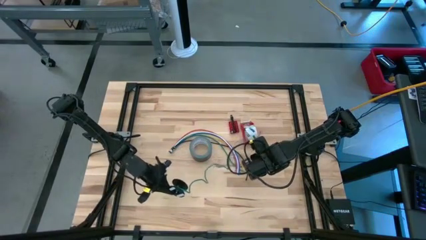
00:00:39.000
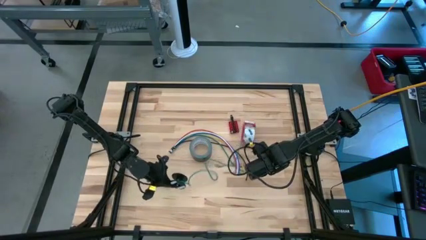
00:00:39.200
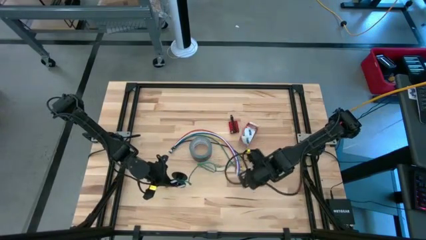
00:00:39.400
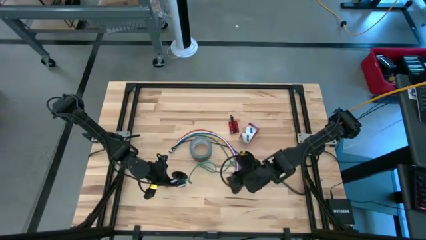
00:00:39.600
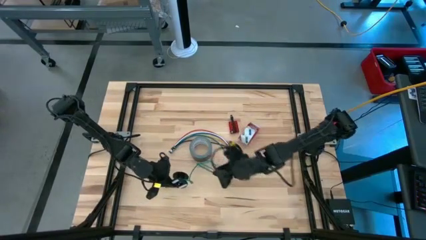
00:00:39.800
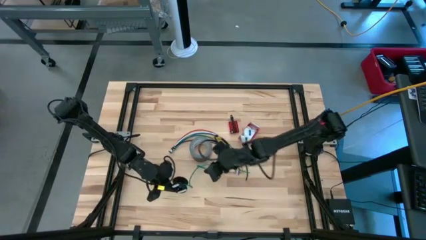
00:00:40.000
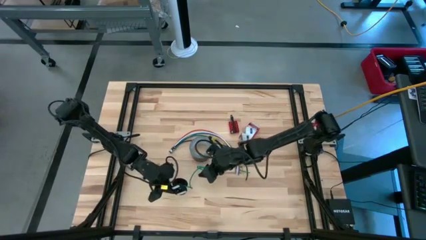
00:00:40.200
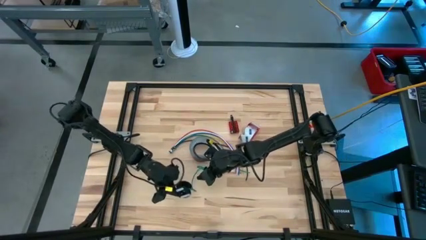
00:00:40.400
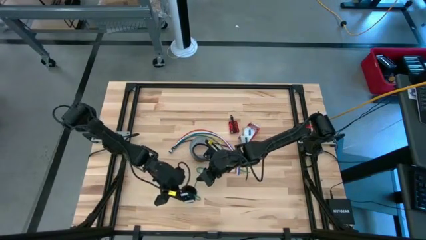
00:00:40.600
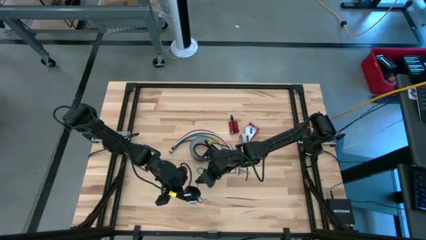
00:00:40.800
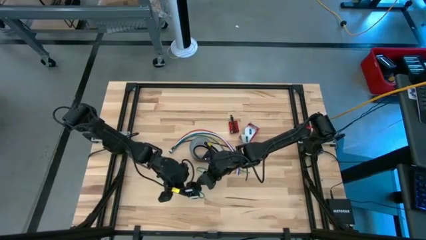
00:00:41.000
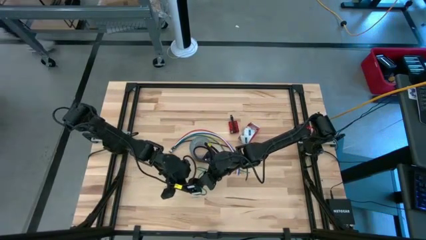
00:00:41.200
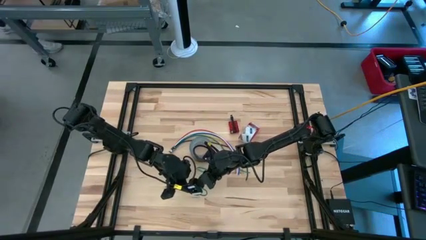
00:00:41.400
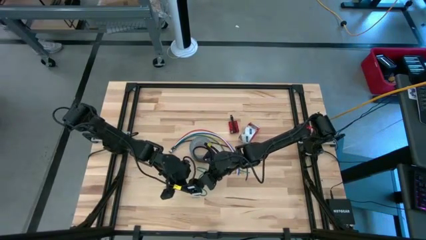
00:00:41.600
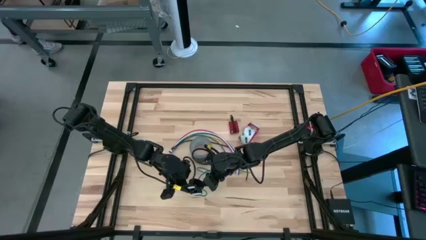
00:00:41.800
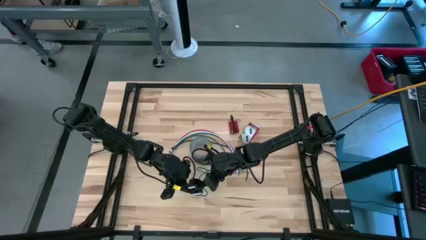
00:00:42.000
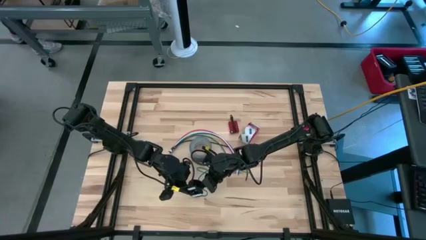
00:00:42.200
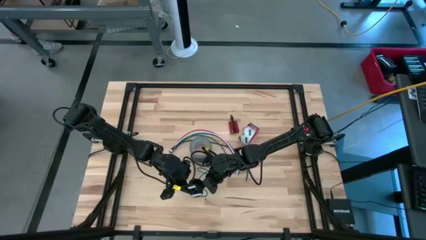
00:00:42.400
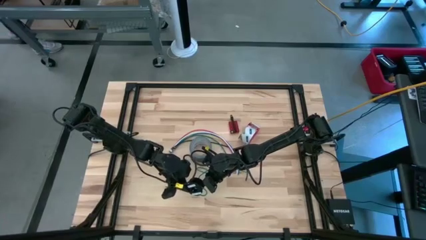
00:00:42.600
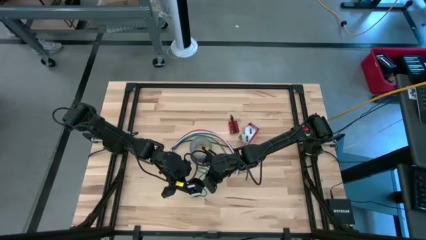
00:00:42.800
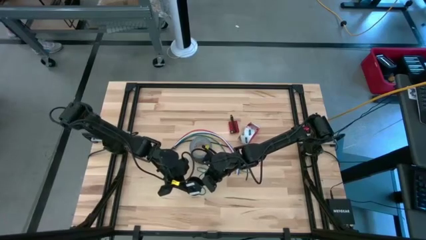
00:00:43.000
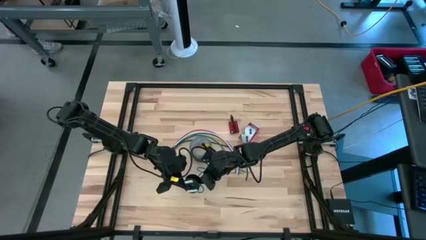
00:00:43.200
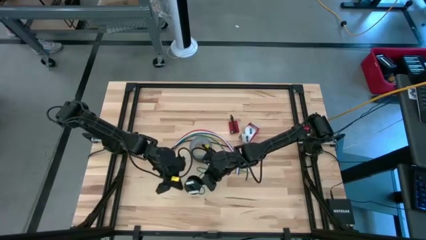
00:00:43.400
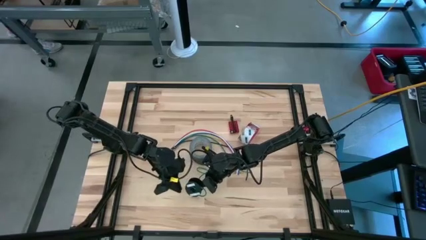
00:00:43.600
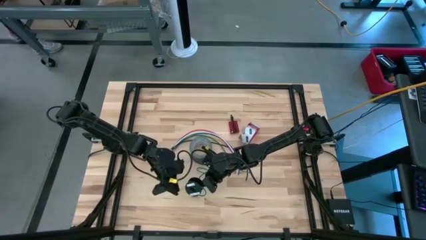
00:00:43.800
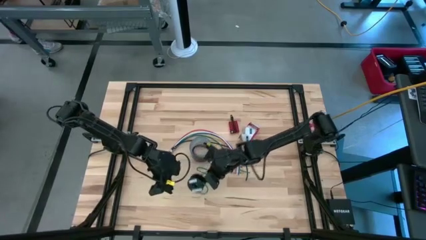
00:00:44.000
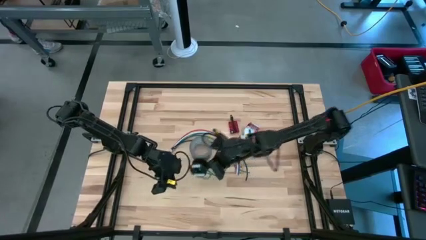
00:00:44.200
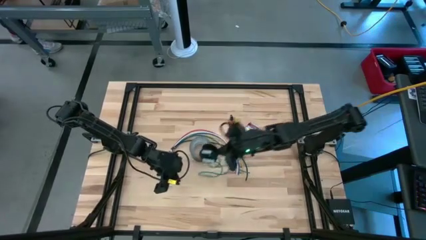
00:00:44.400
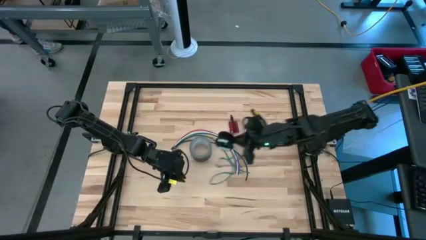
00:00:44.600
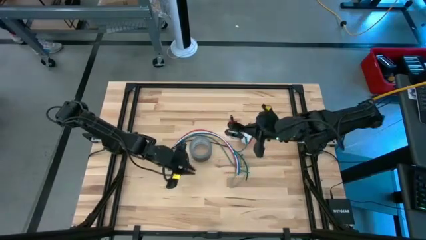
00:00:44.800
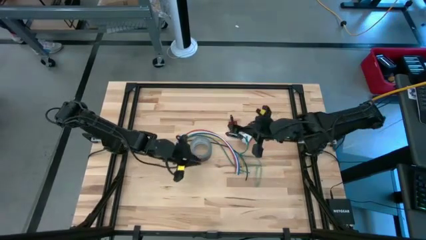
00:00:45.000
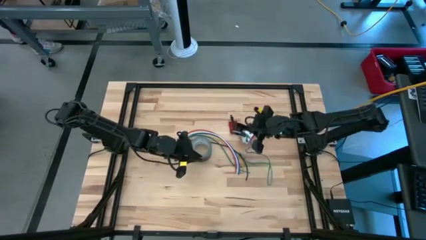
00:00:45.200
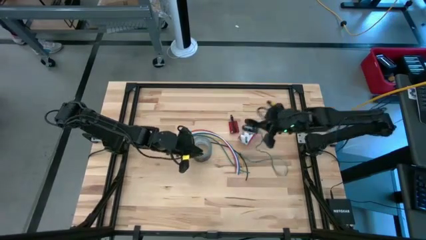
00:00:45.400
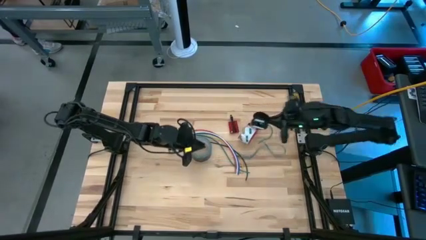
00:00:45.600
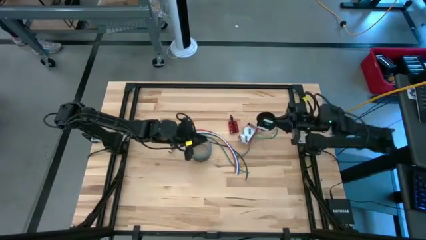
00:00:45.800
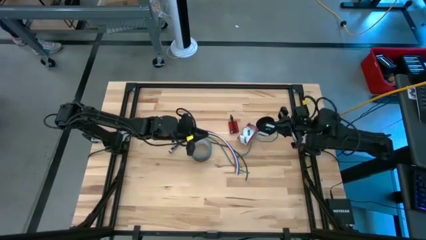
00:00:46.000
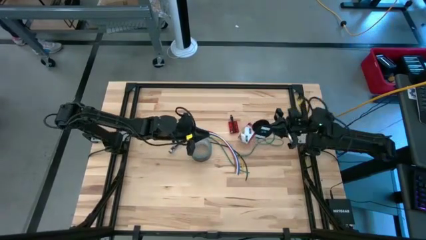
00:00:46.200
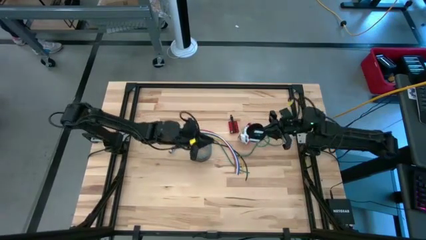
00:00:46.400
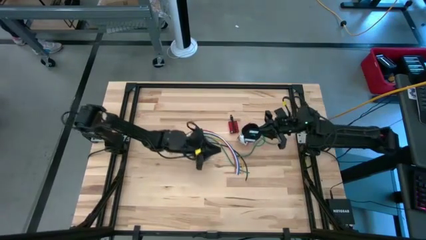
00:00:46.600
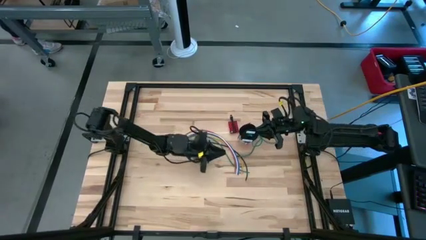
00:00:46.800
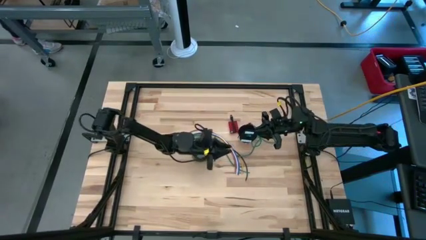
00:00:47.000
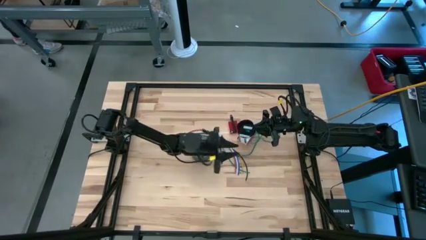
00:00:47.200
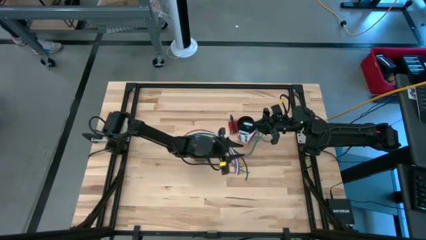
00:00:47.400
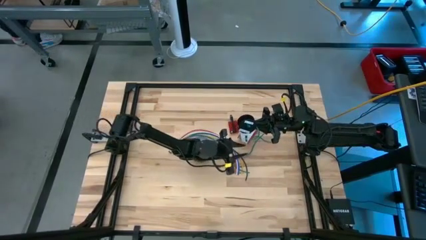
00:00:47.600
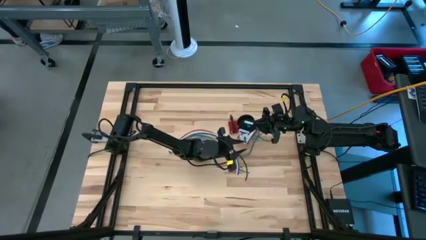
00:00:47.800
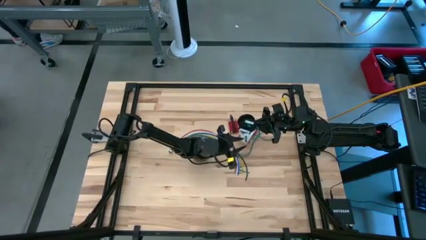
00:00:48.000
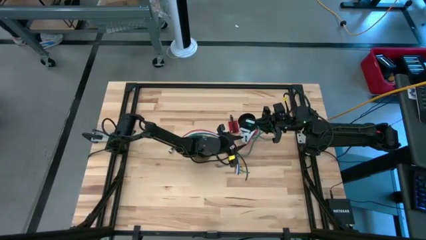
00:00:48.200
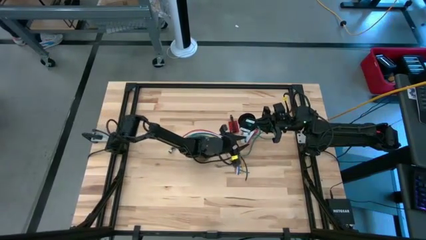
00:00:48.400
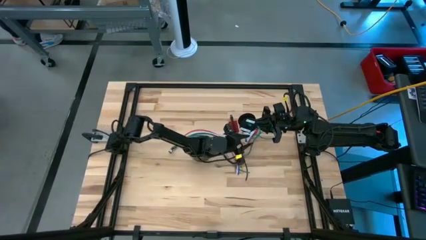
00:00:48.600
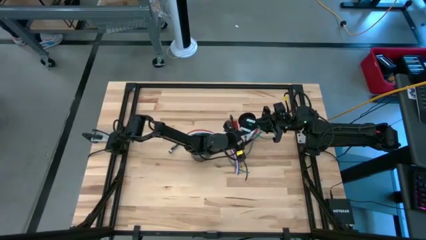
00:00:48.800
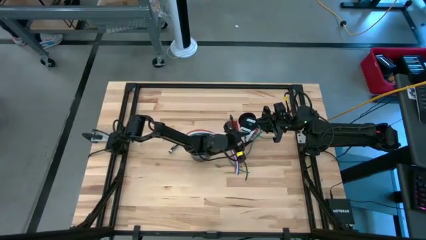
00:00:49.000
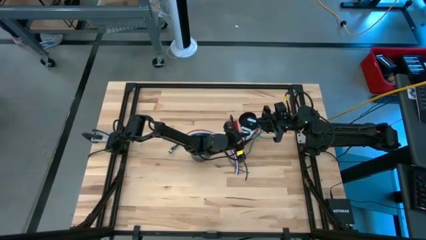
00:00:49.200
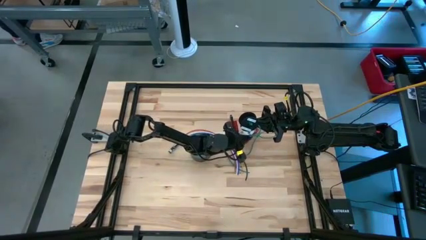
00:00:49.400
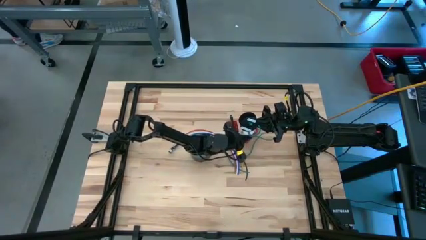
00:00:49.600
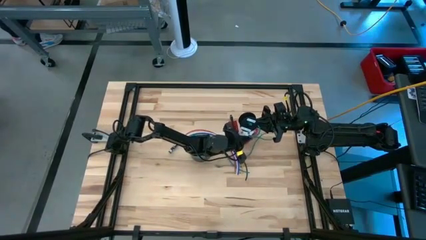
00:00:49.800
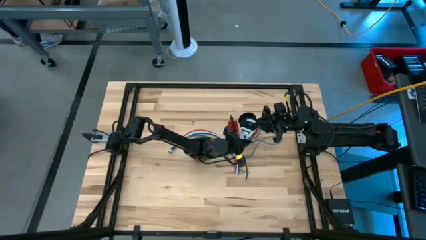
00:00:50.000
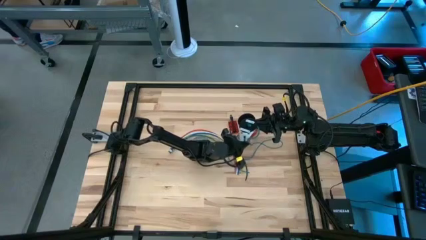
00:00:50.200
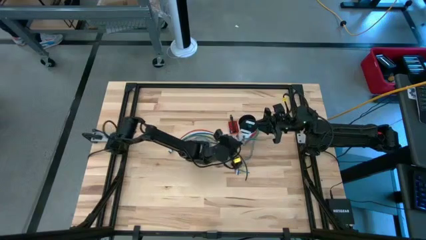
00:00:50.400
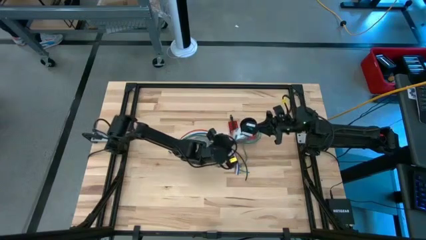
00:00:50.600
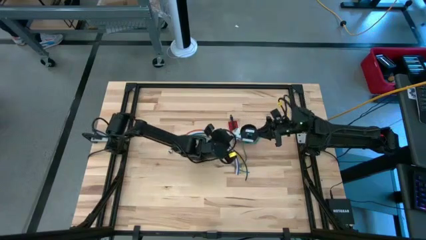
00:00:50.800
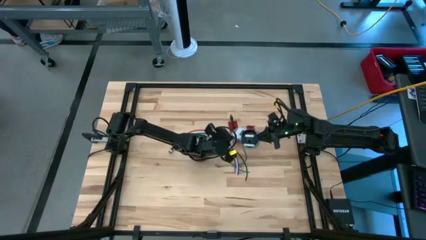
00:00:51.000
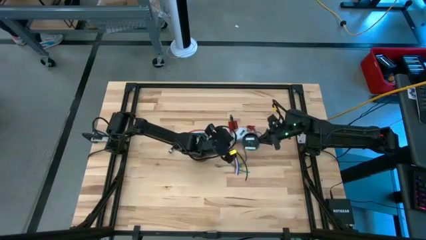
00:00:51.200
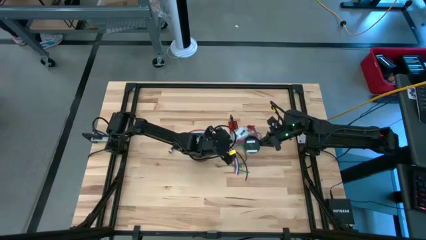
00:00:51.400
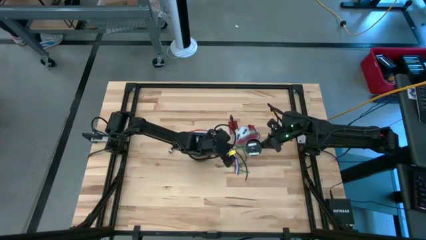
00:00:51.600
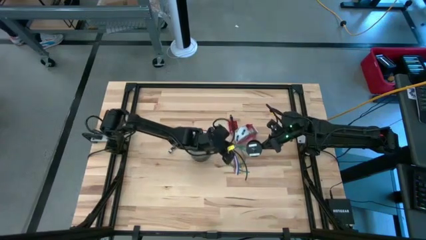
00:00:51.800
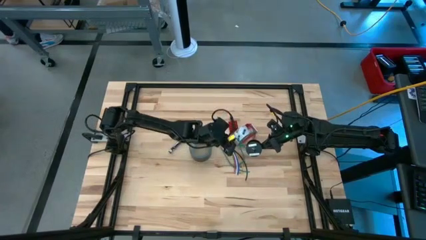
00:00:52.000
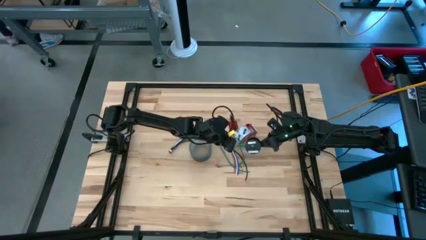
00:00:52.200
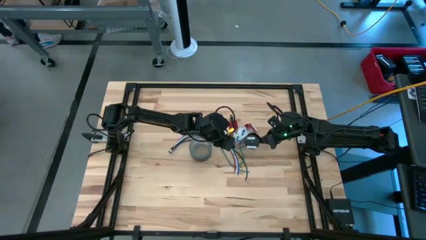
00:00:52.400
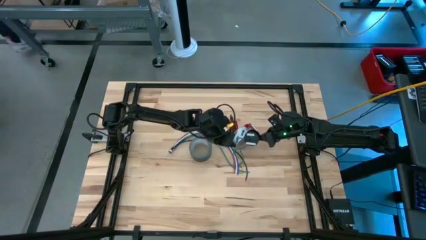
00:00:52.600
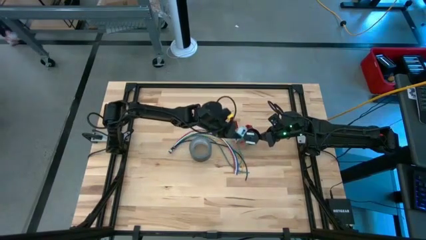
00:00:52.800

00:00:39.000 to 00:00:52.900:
Task: Coil cords
Coil the green wire into the spool

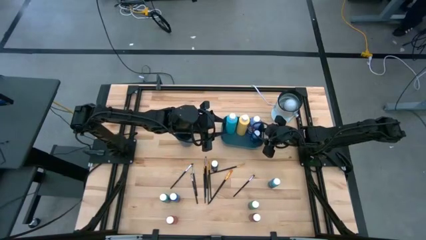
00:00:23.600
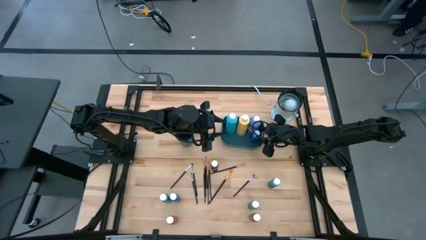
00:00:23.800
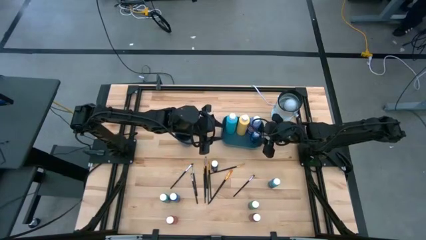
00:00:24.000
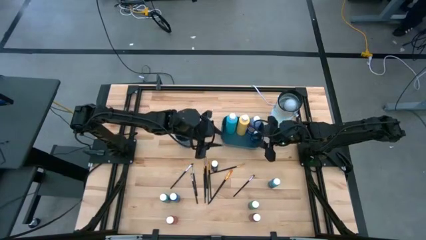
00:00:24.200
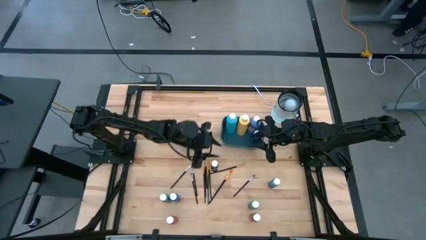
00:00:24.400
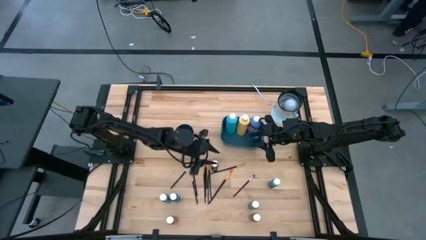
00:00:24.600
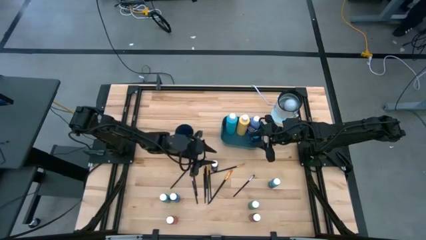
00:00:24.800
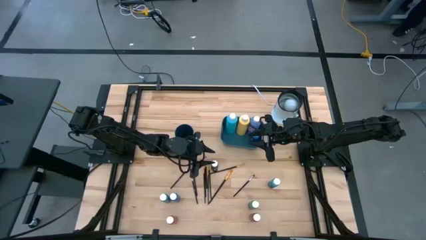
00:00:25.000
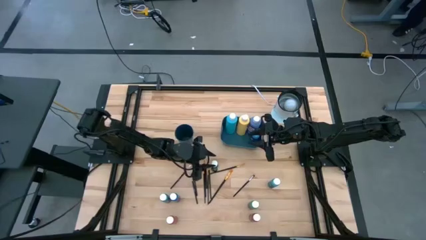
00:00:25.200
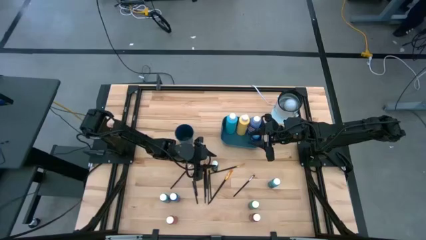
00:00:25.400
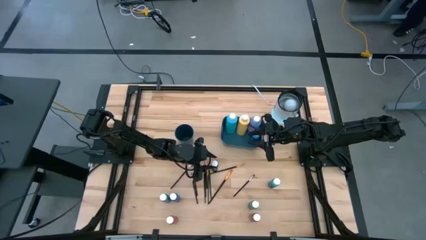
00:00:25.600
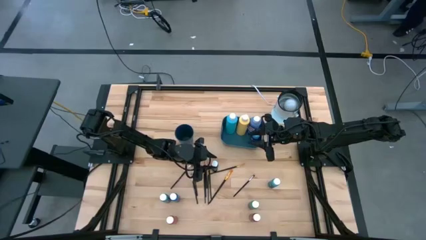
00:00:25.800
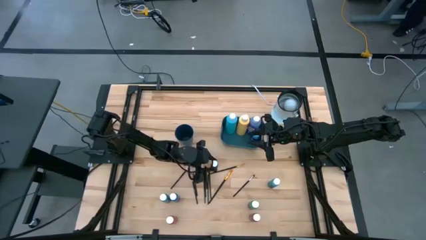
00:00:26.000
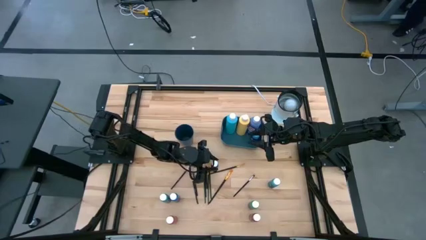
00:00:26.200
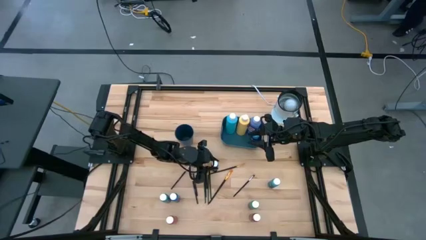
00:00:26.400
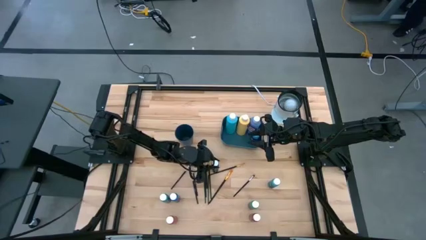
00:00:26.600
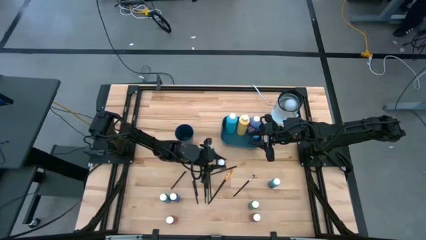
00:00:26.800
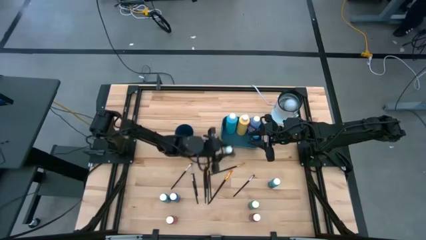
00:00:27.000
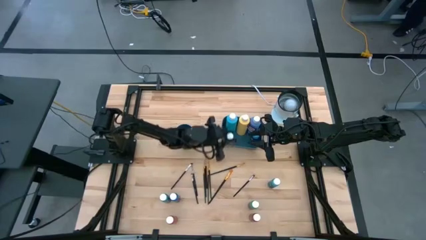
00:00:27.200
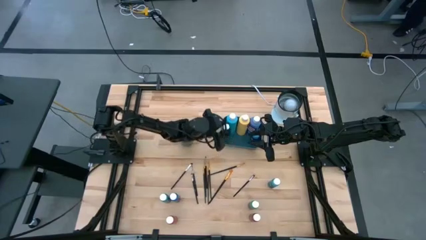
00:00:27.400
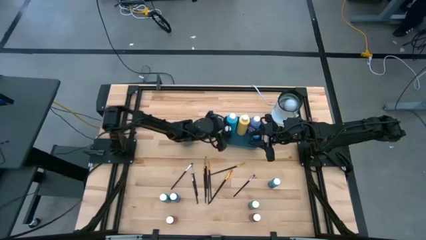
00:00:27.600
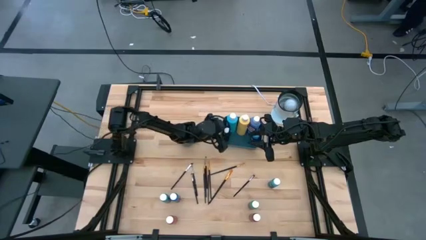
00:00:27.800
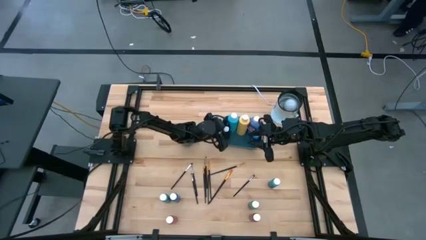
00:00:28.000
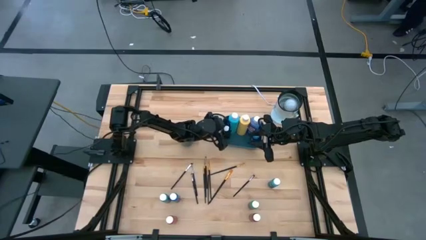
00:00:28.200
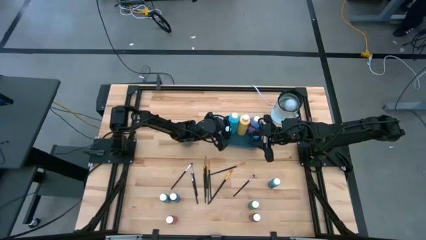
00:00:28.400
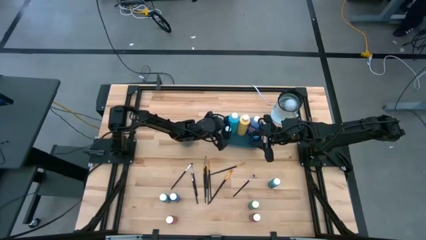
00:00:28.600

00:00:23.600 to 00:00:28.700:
Task: Pick & Place Paint Supplies
Put the small black paint bottle into the blue bin
